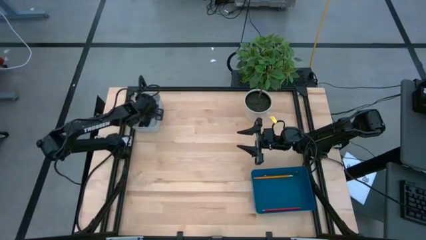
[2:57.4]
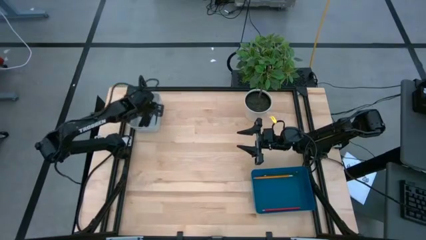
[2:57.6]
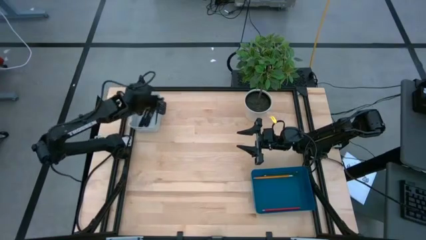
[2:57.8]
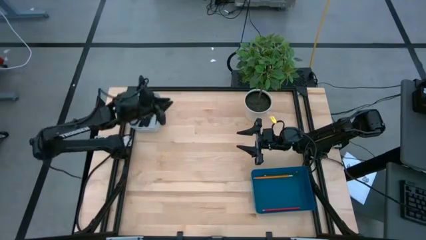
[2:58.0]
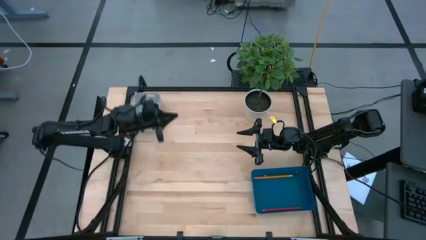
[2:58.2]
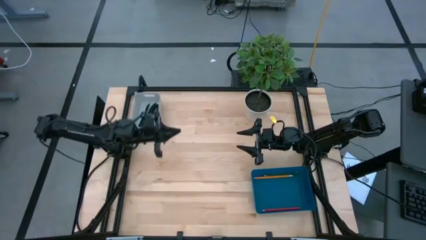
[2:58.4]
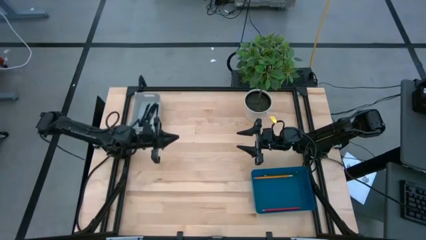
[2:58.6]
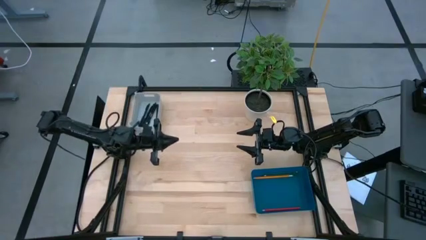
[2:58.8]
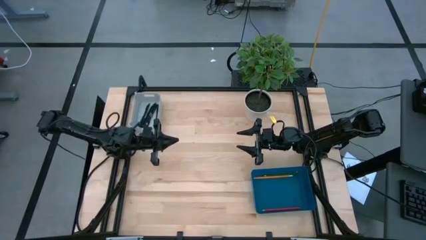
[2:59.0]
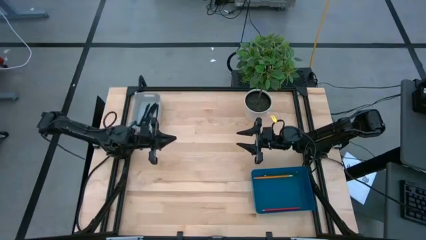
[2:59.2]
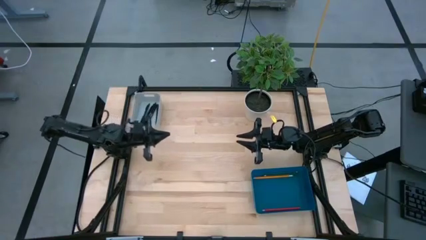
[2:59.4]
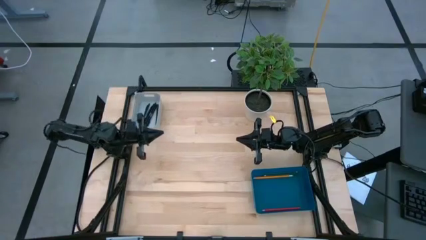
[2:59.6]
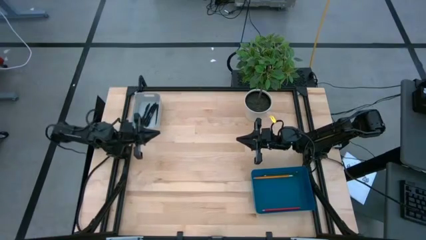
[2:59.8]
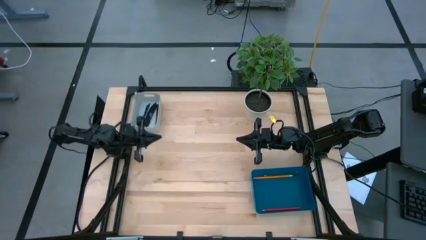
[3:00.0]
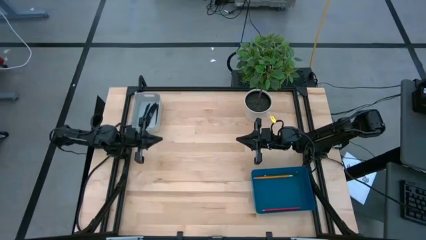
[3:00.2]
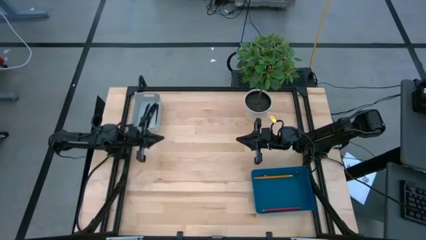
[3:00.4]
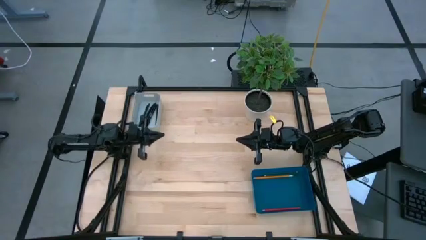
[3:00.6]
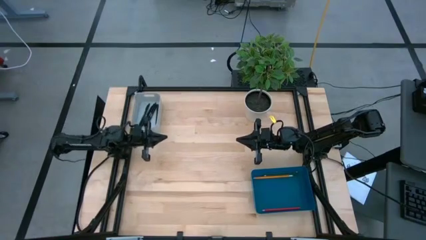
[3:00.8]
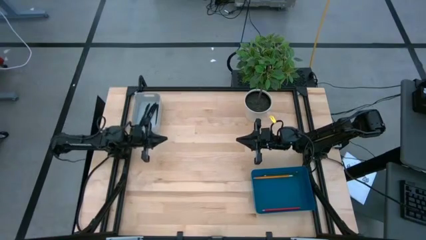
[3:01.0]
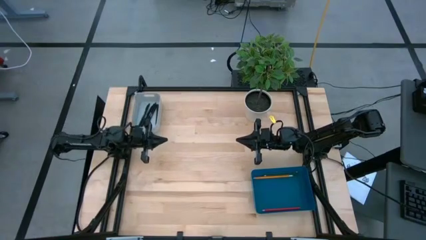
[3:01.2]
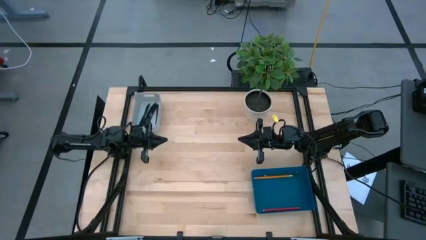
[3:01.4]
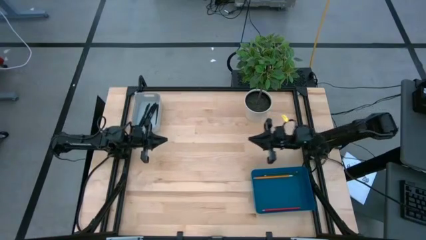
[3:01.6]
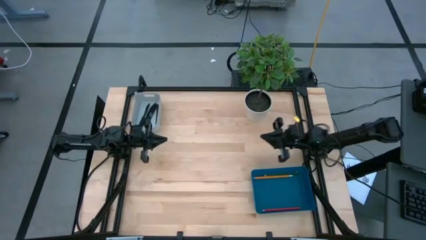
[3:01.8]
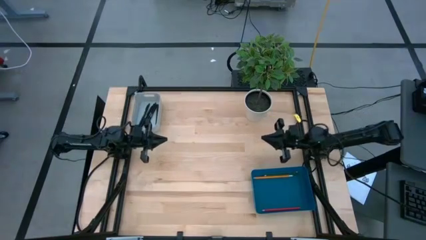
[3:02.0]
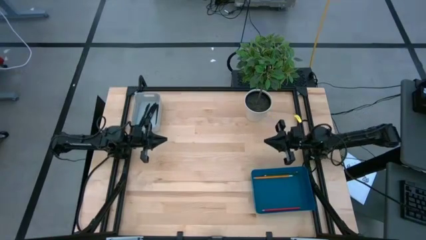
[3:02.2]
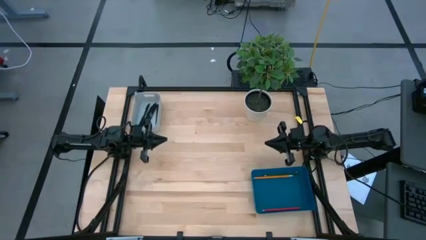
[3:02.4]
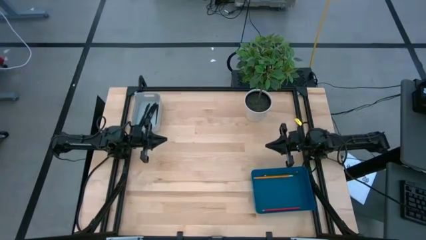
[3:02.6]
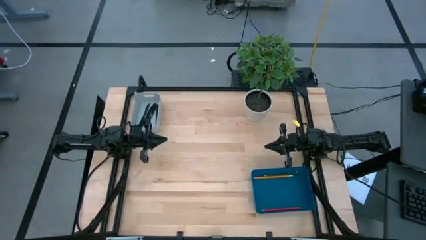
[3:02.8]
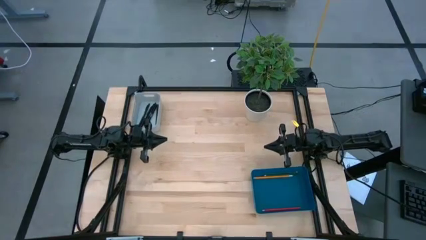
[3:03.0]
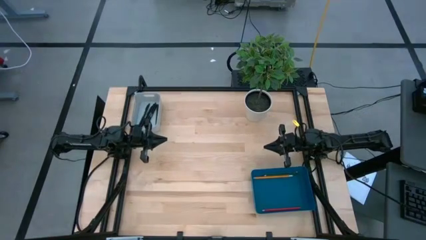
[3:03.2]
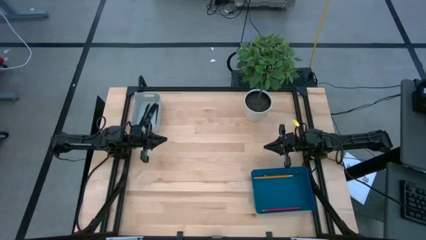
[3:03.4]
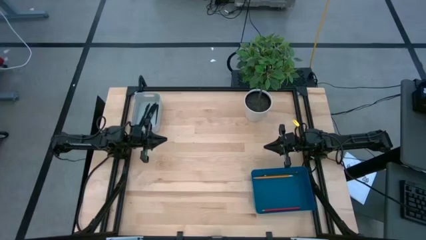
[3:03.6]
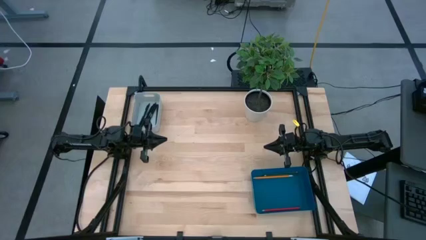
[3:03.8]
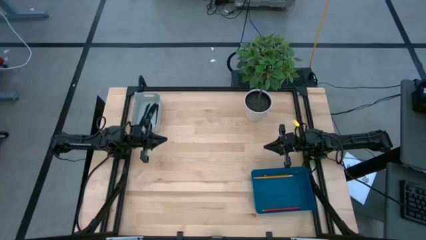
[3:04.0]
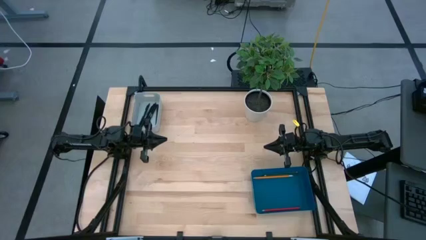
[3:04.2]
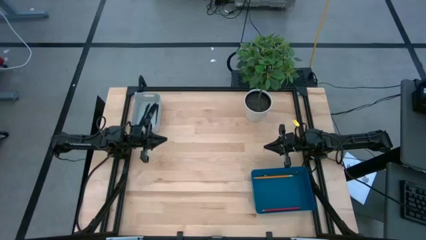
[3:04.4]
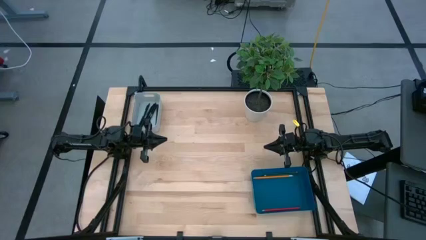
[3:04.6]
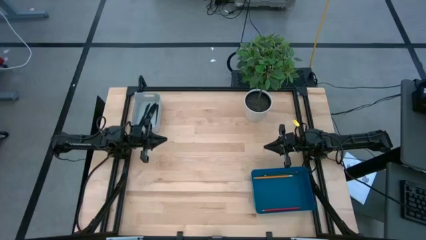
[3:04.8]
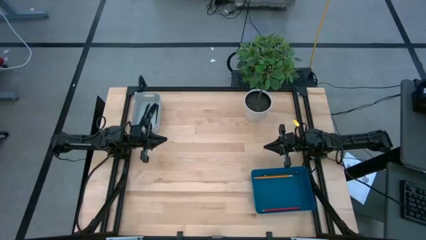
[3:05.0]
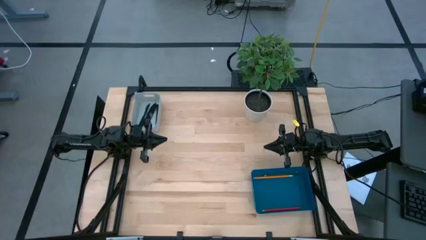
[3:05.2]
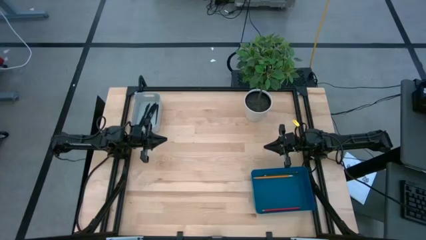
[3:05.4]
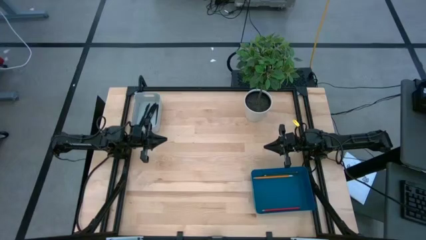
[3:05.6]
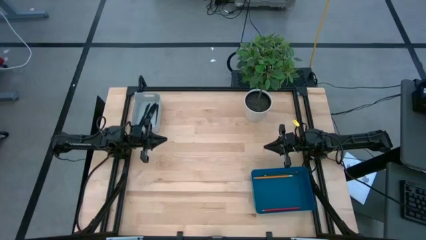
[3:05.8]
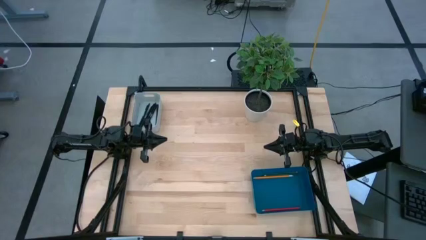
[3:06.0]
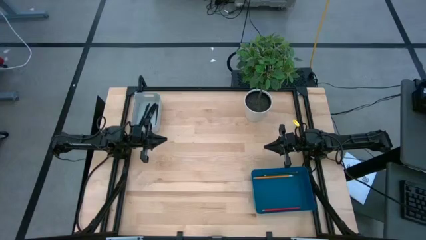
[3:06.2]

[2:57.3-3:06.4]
Task: Sort pens & pencils
Return to Home Position

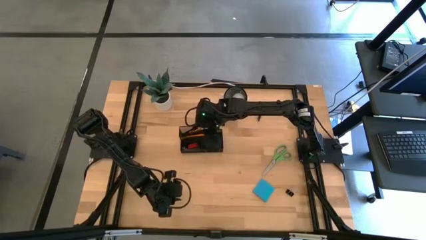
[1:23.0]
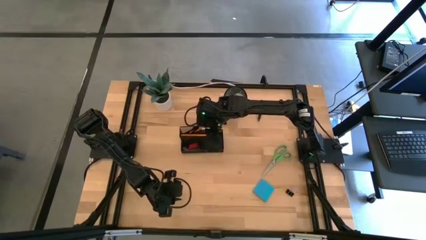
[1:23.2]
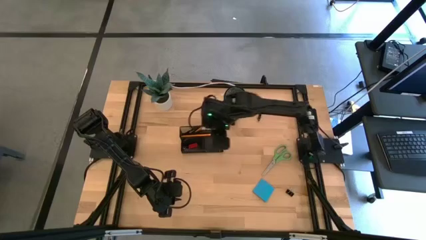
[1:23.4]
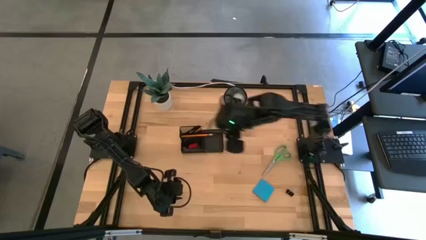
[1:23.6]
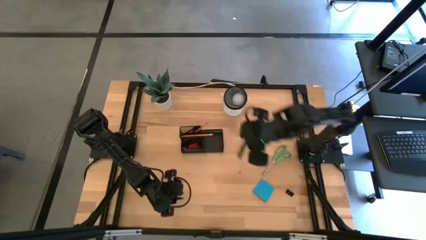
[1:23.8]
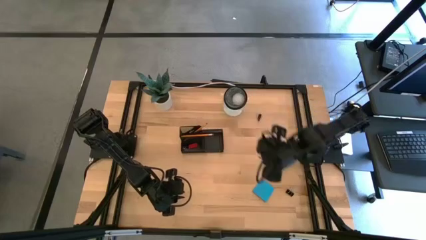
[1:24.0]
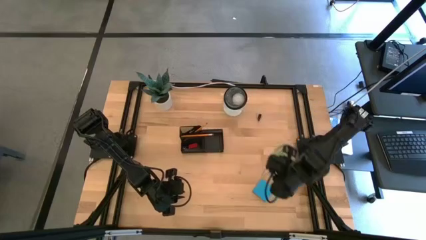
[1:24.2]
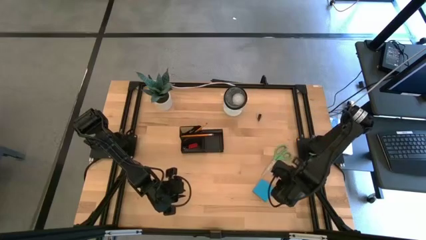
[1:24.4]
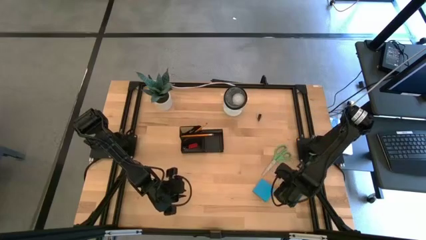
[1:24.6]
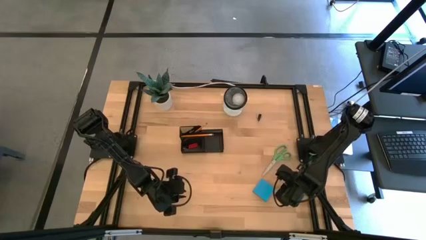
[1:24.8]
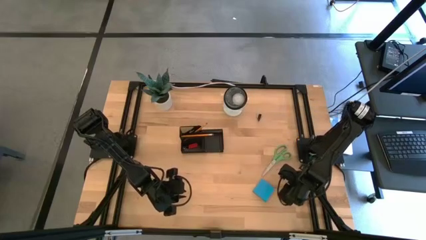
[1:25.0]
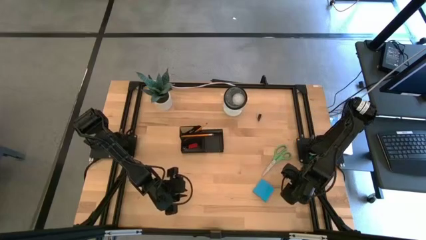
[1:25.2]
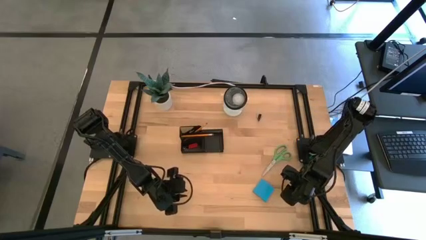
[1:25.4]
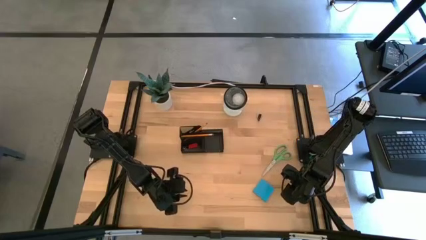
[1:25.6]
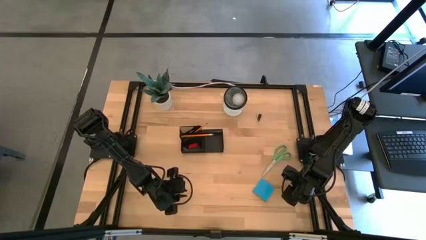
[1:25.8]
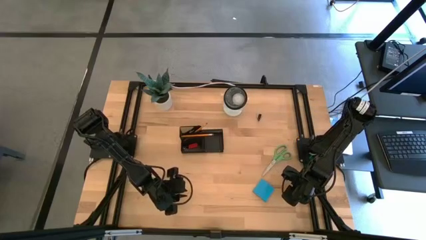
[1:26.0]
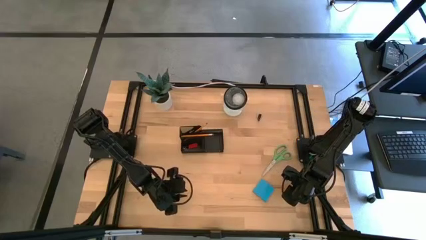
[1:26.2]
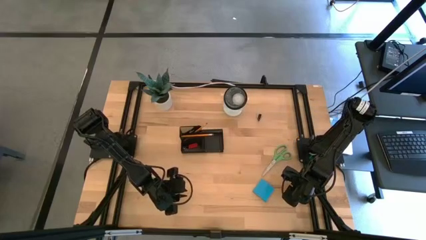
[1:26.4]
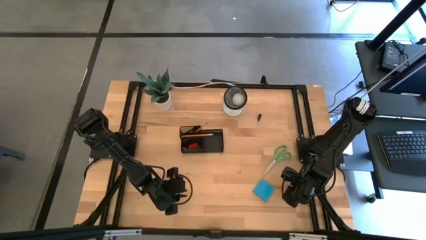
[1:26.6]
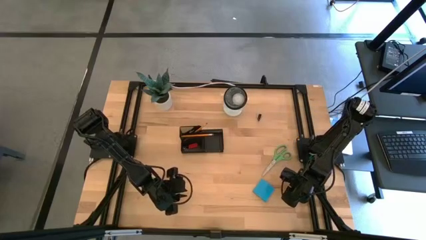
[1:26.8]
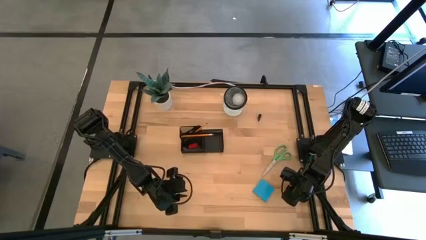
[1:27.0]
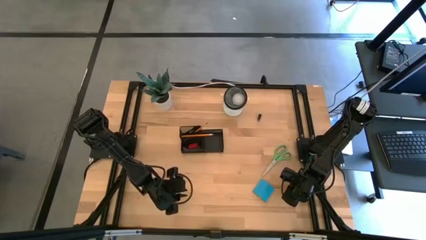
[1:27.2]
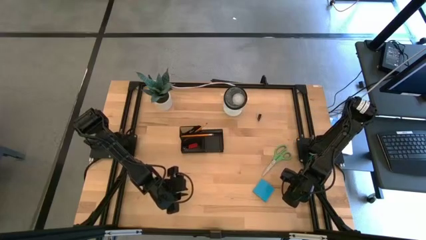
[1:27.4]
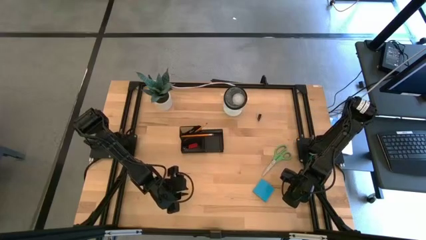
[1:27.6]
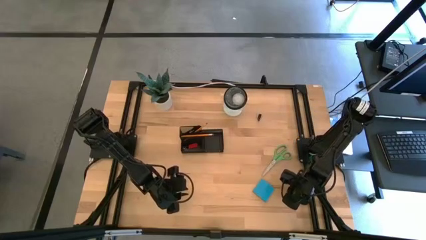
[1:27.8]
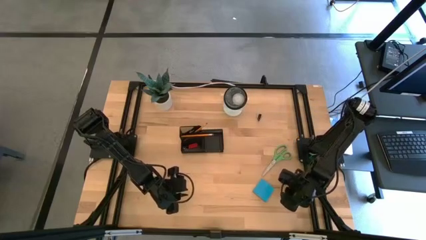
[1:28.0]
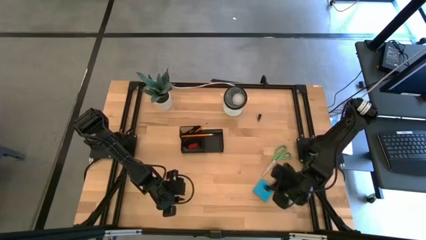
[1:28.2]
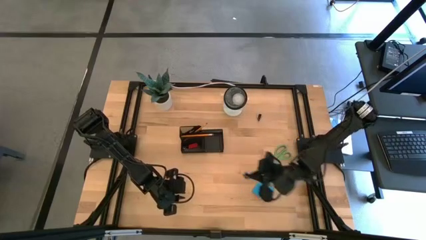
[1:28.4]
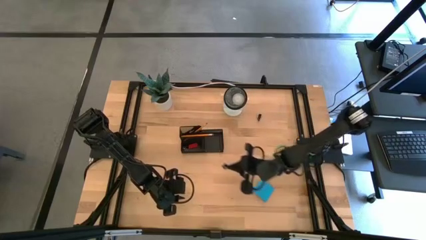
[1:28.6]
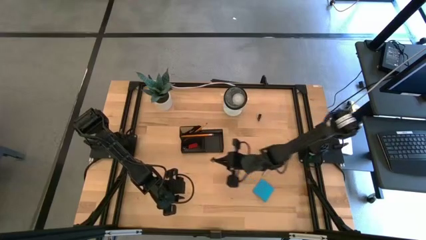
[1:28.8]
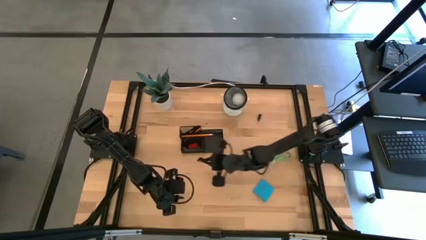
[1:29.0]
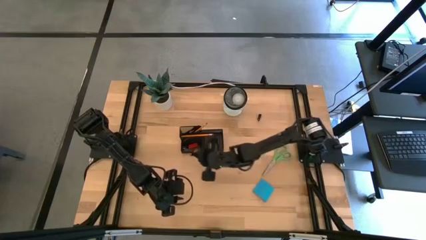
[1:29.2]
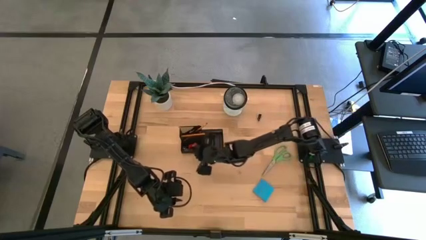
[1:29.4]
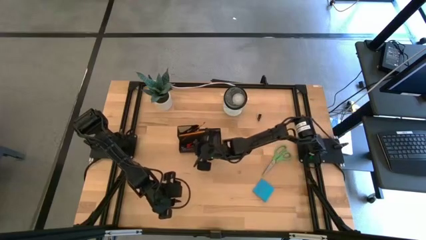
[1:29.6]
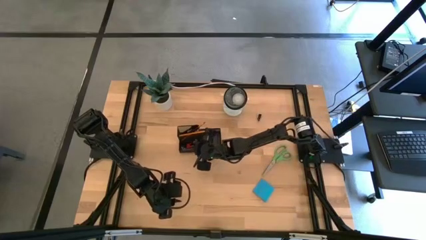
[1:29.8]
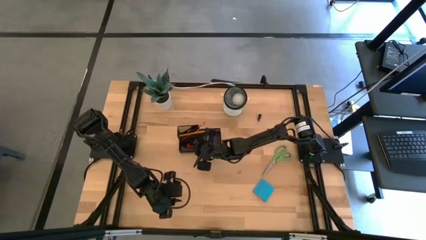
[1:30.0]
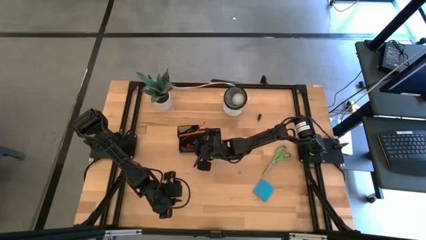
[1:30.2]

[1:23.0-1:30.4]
Task: Pick and place office supplies into organizer
Put the bottom black binder clip in the desk organizer
